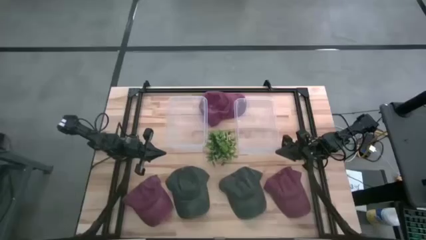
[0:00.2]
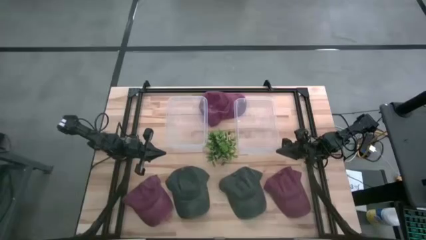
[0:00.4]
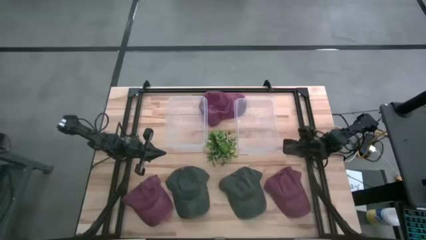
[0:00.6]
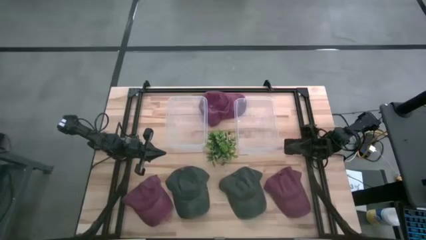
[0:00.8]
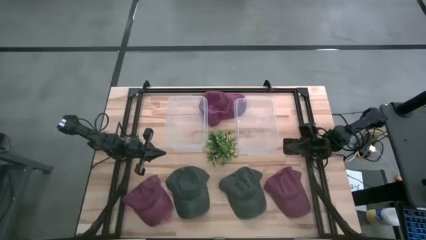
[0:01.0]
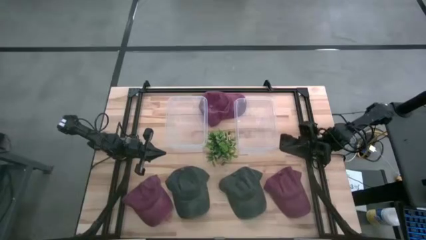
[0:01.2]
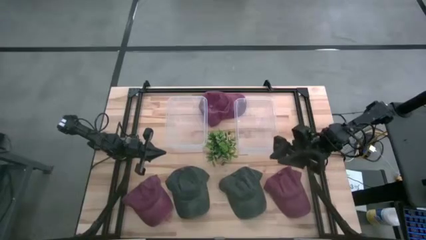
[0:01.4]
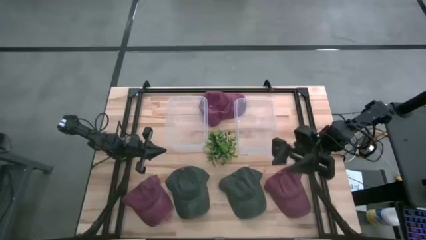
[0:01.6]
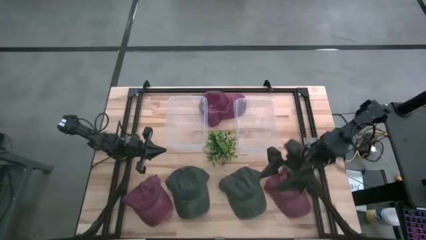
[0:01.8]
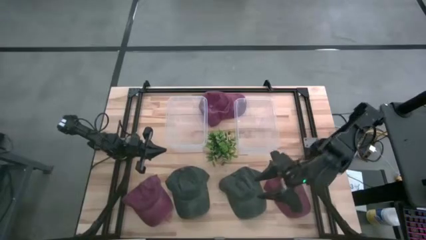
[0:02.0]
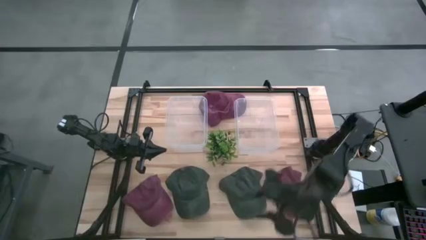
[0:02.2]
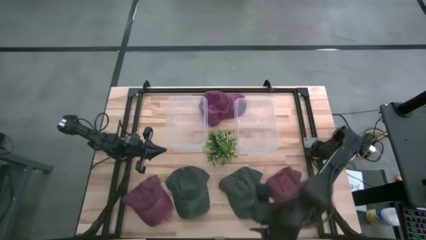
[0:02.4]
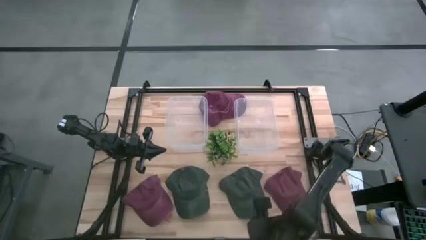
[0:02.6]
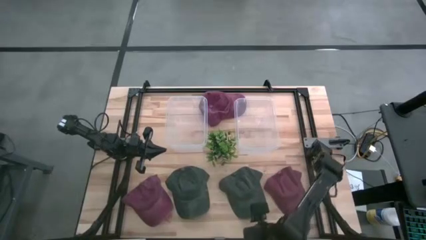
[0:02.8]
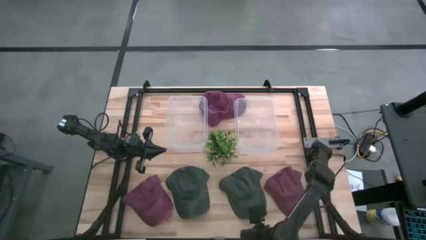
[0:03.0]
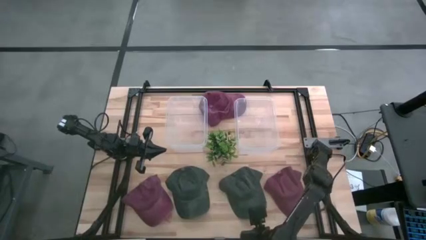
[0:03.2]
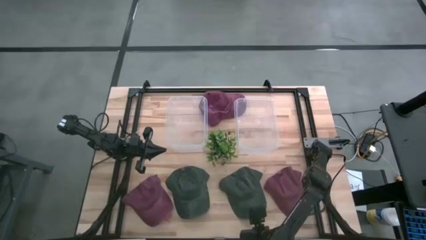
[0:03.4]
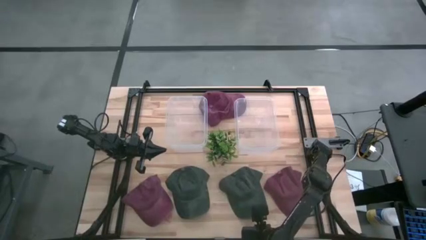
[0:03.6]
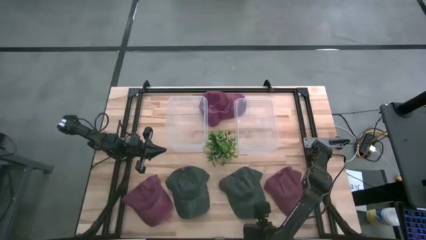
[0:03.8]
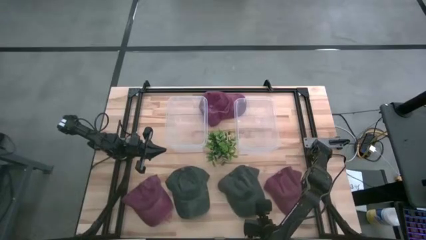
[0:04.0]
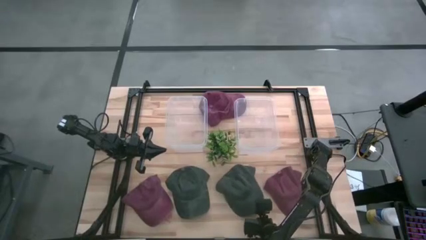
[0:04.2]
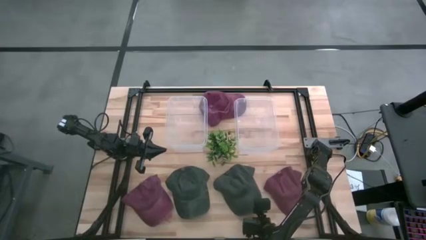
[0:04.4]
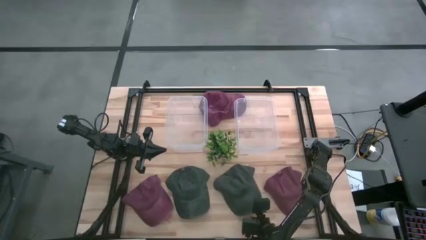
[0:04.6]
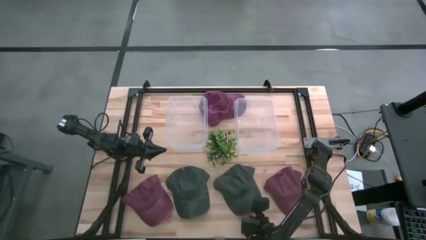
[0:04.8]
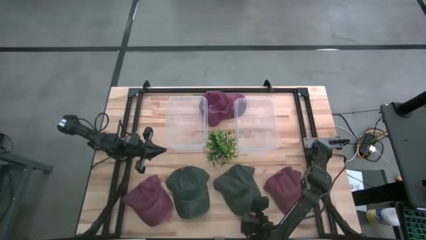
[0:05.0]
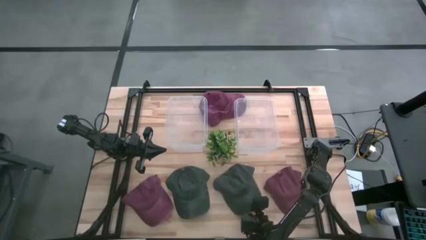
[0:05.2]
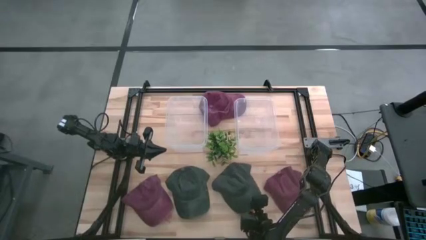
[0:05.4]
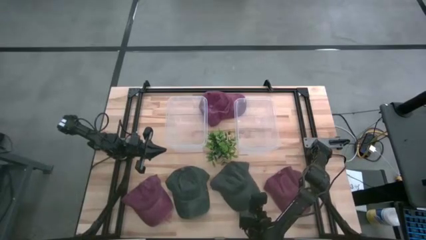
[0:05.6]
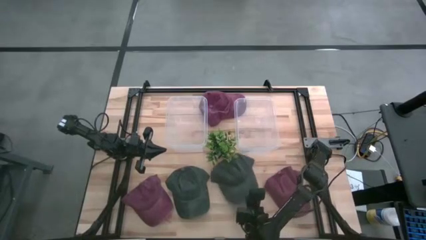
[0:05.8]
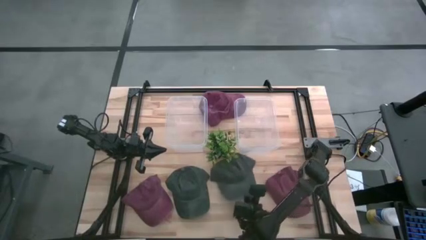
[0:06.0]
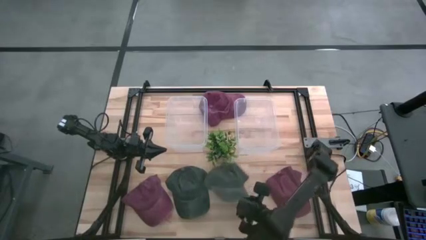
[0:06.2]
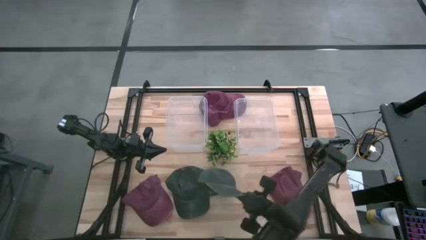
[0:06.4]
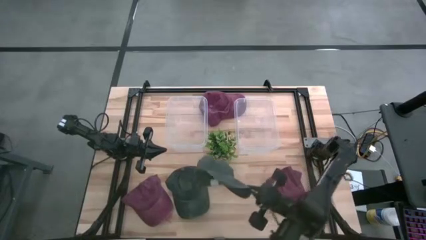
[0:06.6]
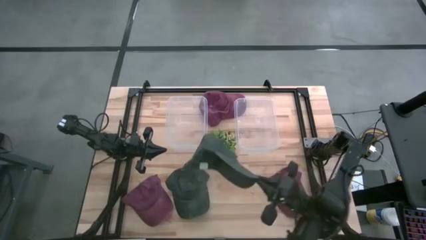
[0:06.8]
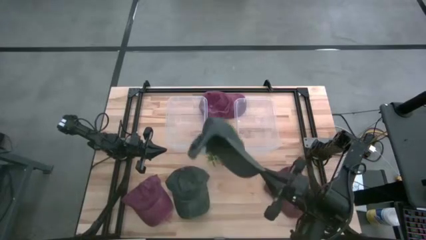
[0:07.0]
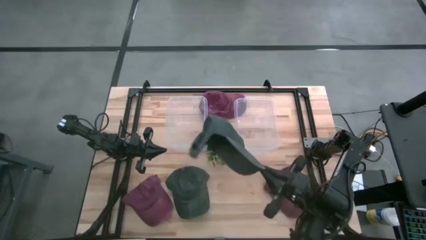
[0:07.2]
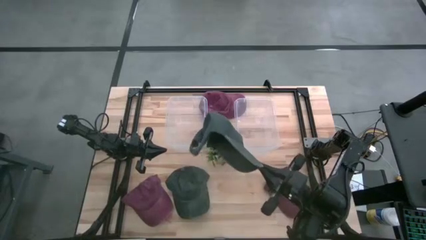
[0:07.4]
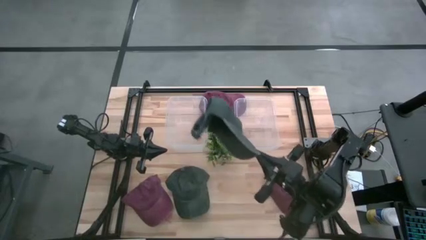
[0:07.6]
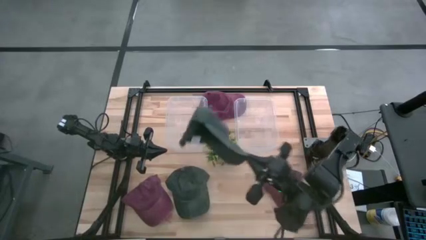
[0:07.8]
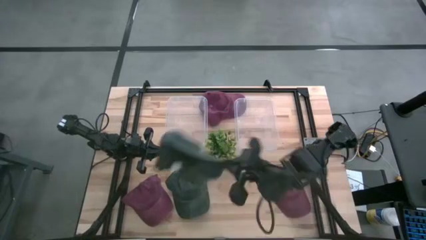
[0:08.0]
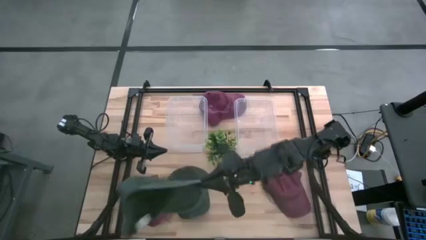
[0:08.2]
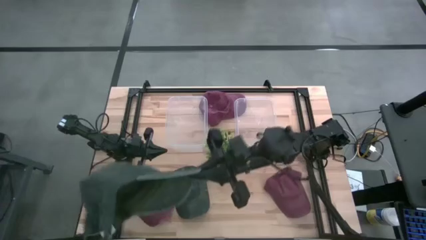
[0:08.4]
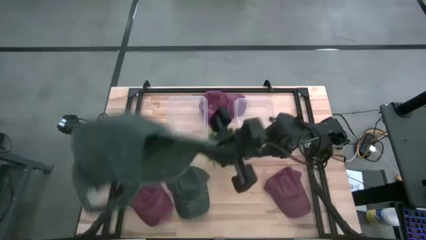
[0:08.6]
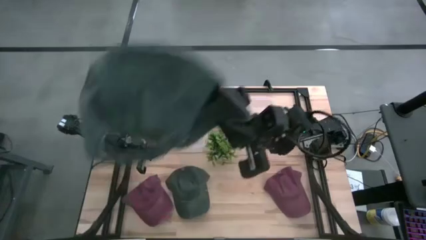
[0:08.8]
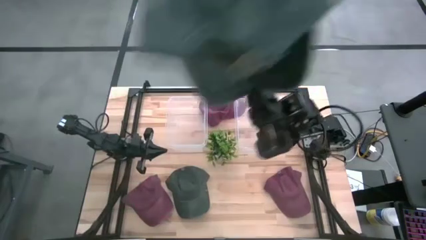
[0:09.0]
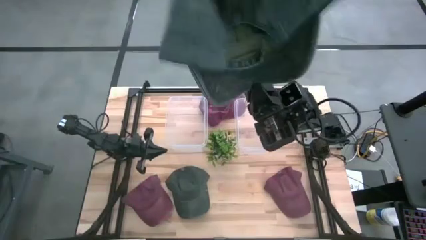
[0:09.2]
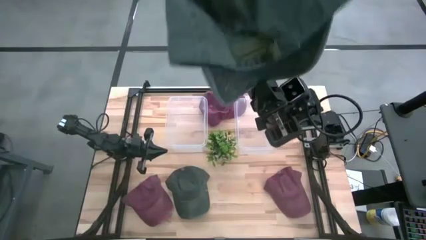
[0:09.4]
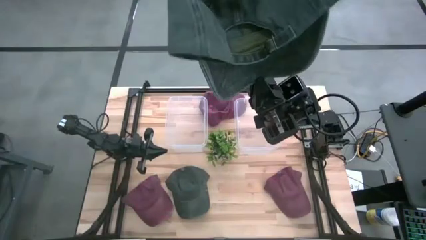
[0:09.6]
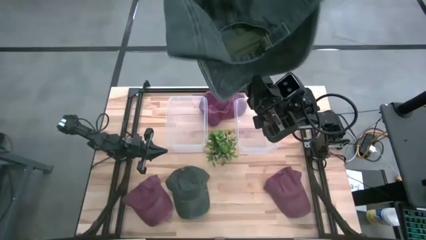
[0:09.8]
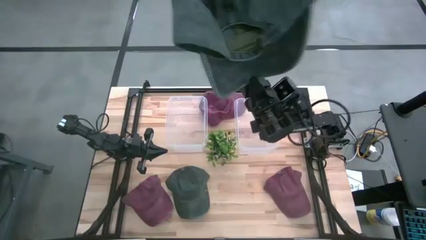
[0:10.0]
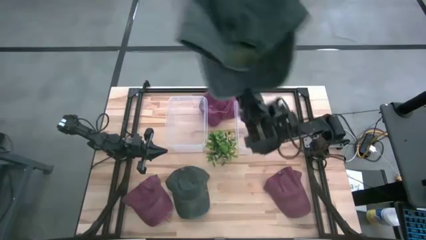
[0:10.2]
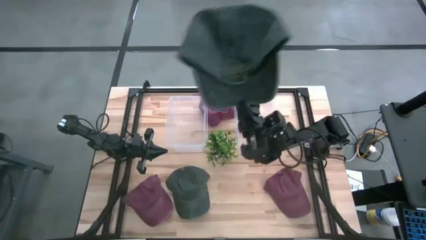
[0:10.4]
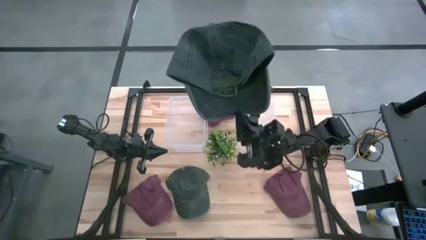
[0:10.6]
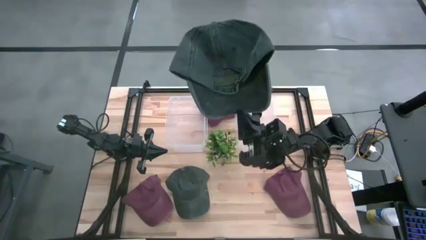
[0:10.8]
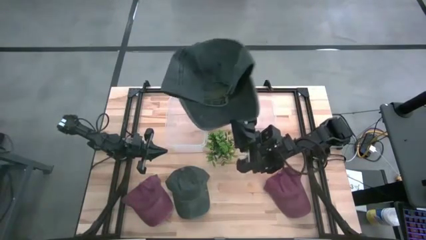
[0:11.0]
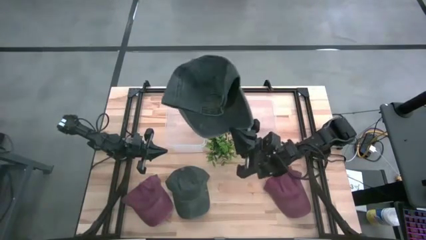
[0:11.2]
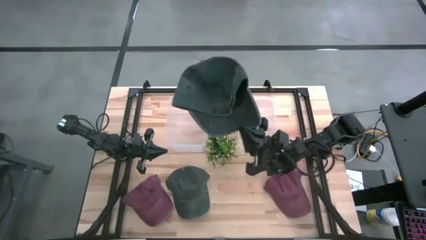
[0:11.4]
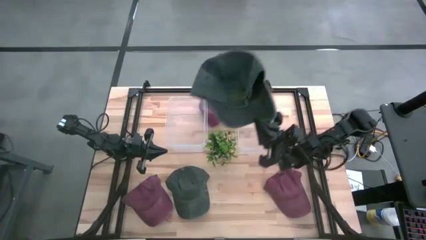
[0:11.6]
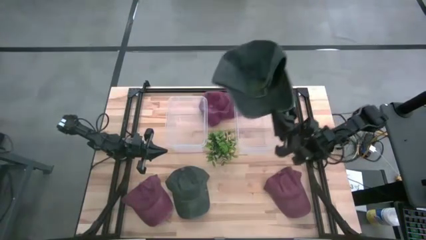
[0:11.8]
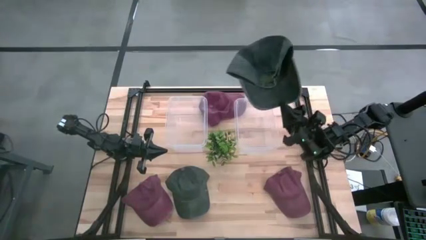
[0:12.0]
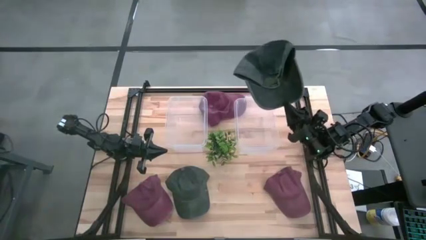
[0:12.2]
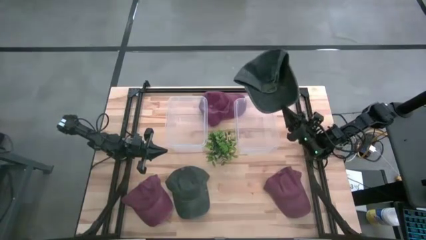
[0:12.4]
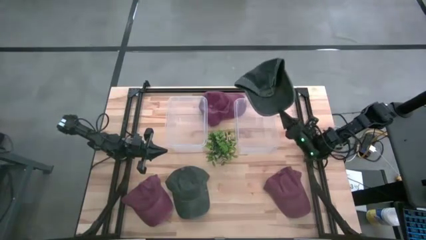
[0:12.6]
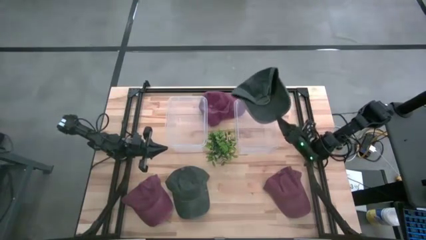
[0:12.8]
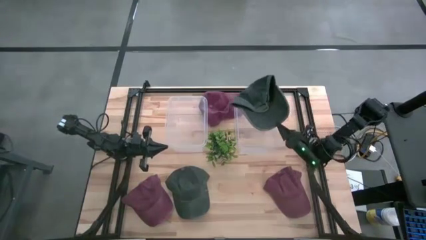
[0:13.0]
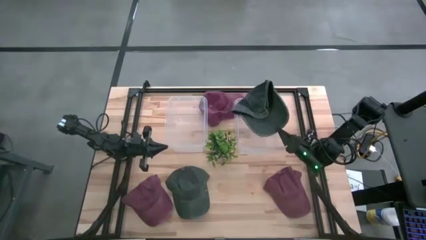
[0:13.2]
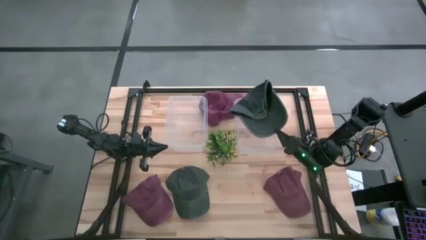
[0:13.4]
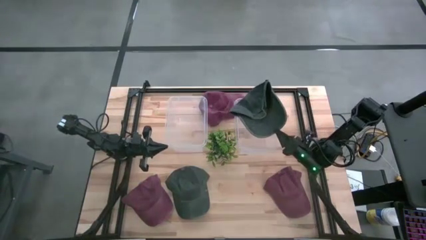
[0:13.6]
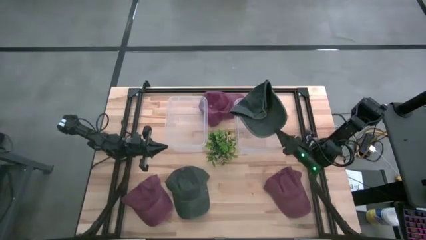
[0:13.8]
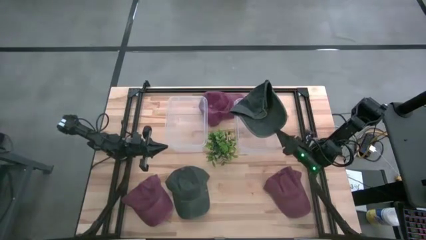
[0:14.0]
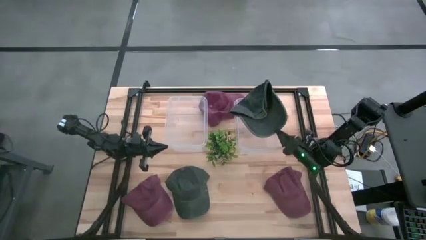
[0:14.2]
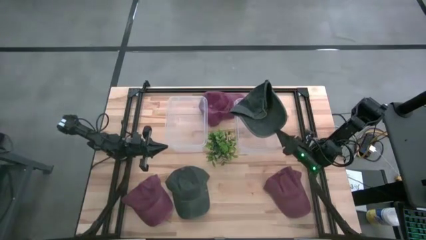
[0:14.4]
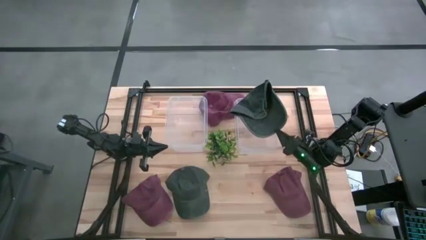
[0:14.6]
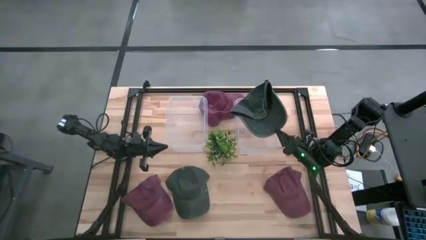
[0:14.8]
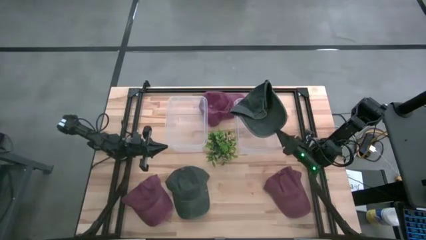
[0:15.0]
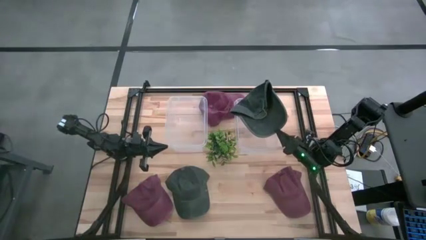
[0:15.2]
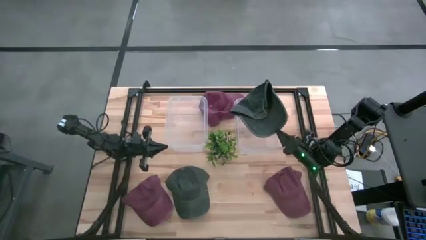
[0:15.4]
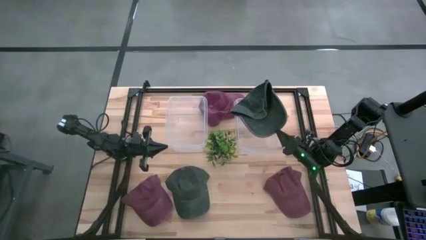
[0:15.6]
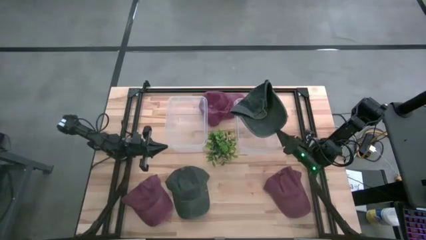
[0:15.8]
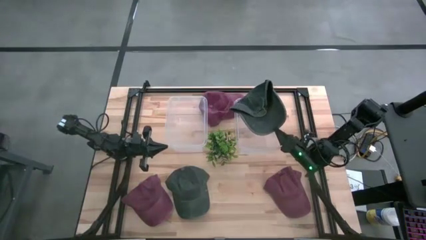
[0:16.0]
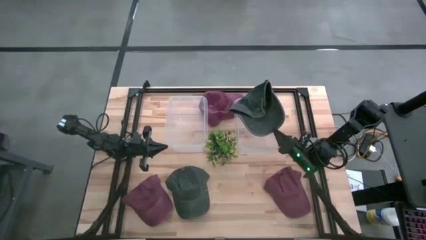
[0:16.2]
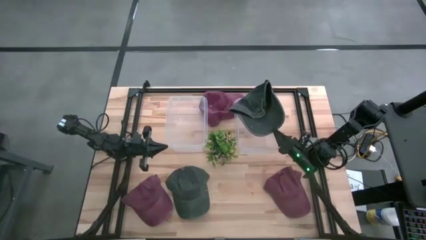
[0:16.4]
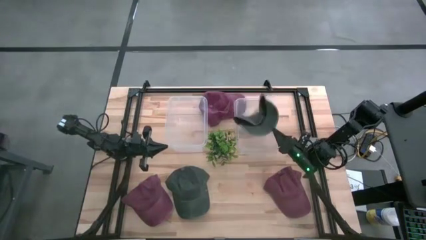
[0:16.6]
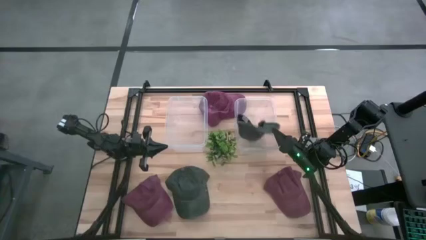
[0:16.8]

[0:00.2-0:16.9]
Task: Pick & Place hat
Put the right black cap into the right transparent bin
